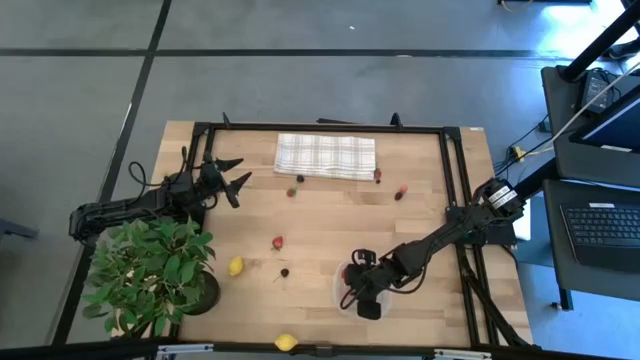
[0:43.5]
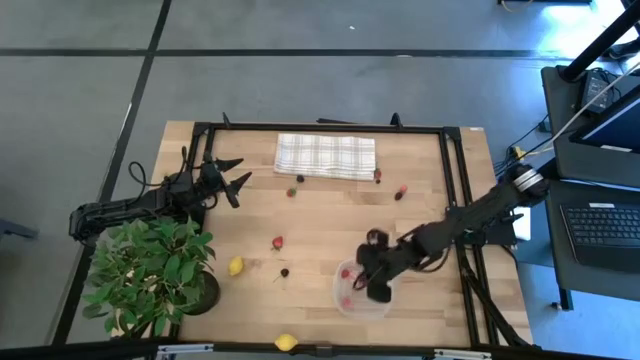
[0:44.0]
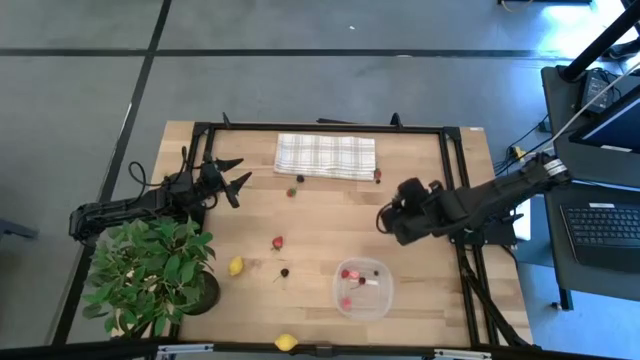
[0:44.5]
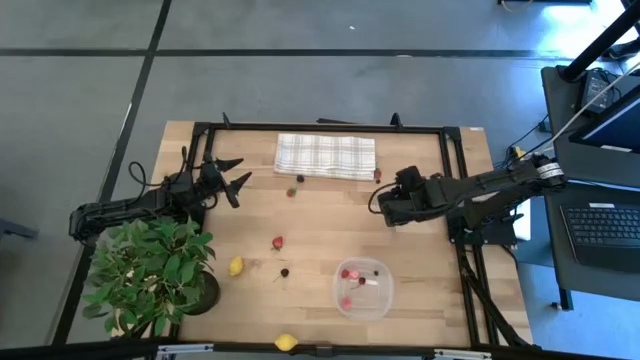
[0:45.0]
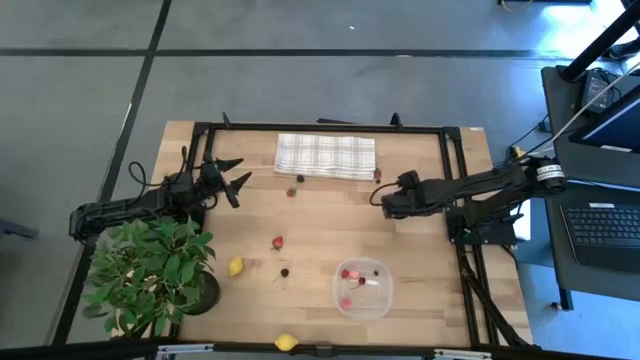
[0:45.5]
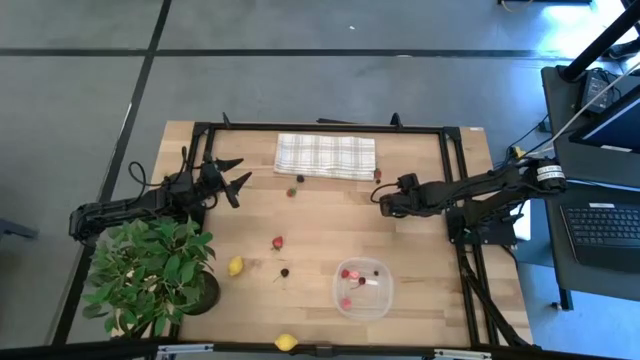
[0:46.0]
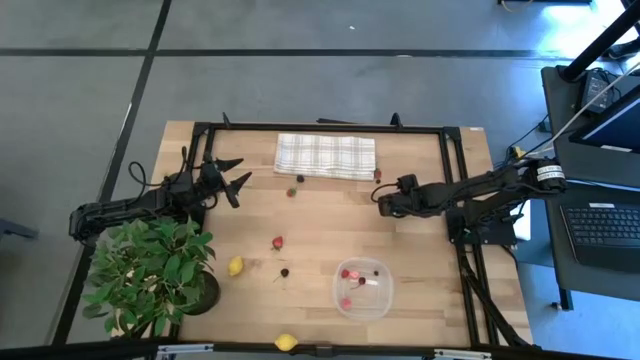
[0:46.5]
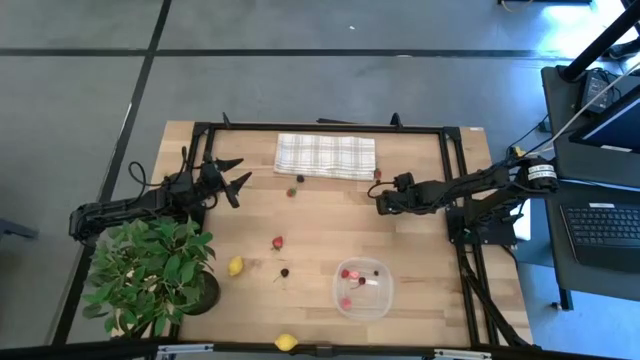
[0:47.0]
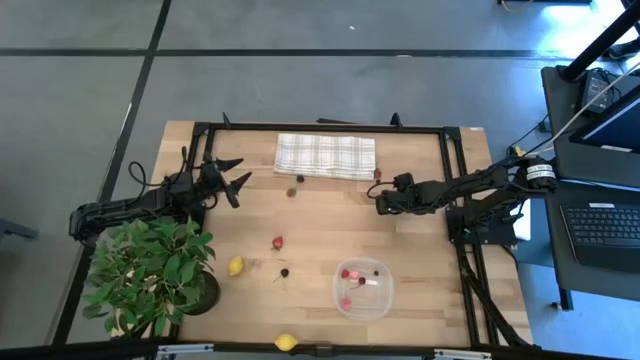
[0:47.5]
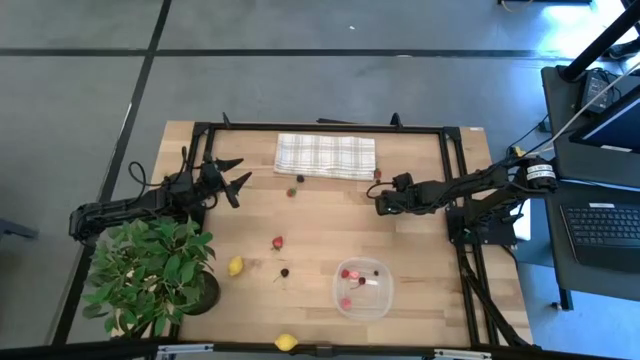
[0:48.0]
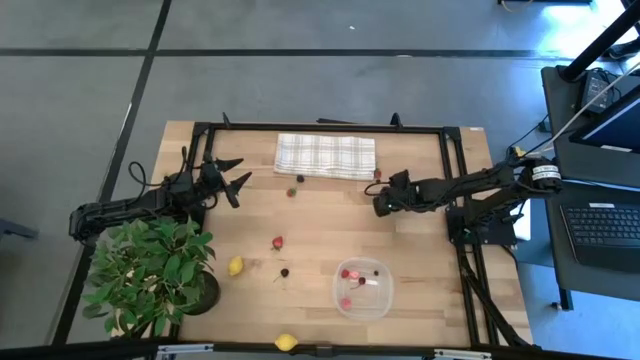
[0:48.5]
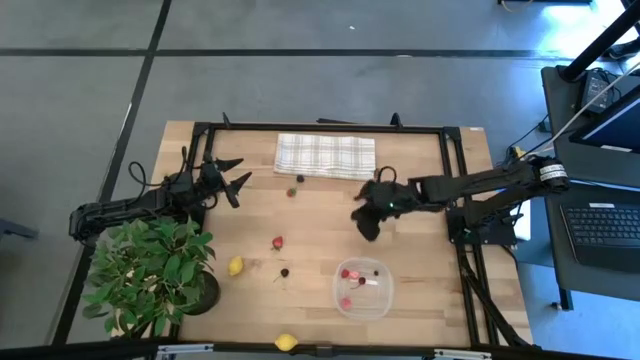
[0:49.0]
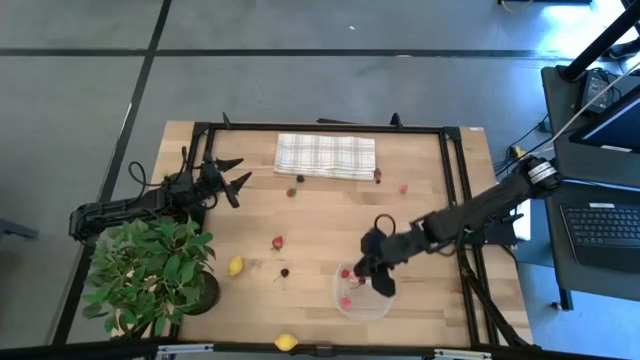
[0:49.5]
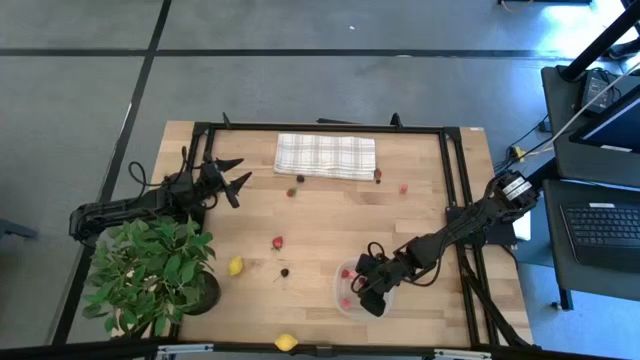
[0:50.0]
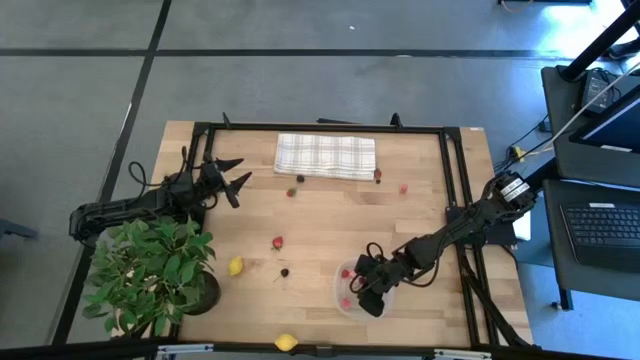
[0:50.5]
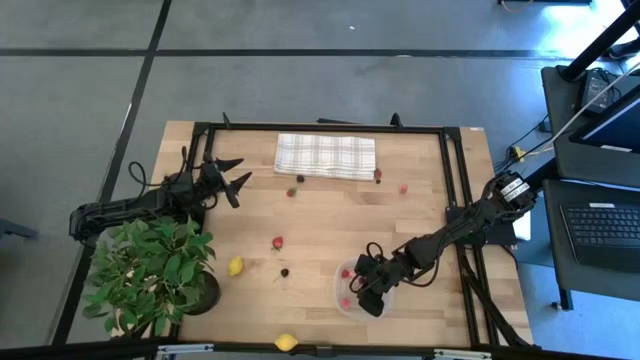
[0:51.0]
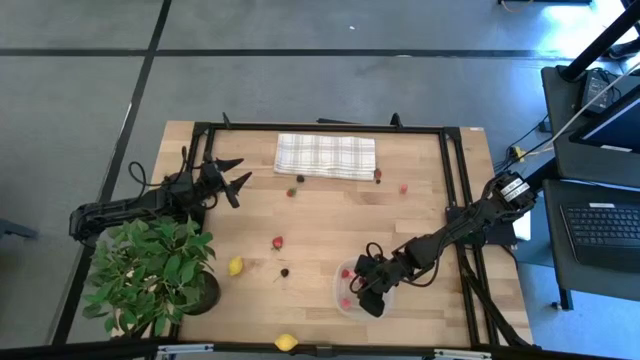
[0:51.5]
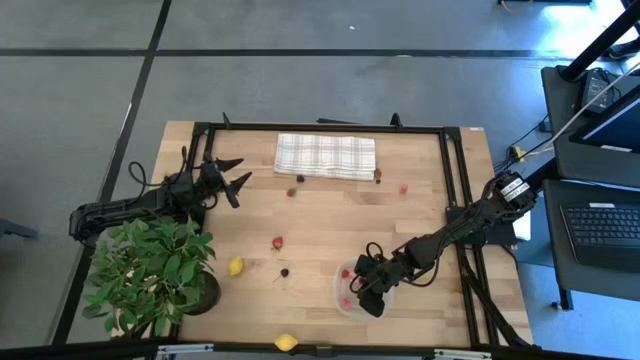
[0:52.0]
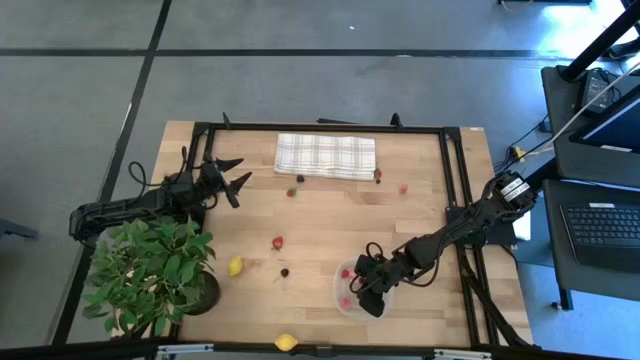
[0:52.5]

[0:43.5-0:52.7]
Task: Pick and placing Produce into tupperware
Put the right dark purple blackberry into the transparent bin

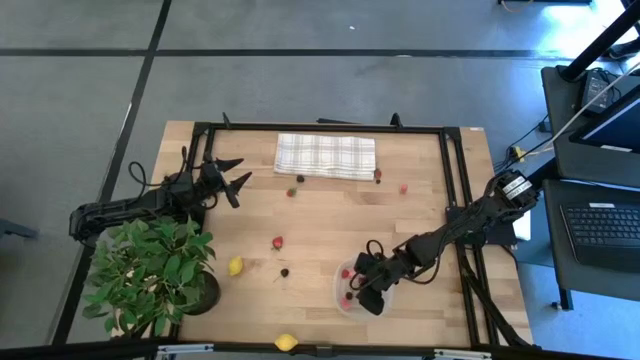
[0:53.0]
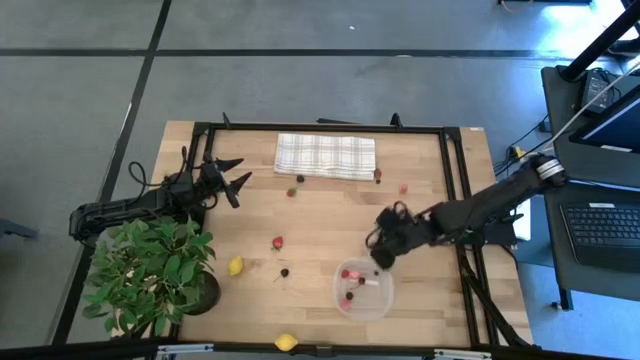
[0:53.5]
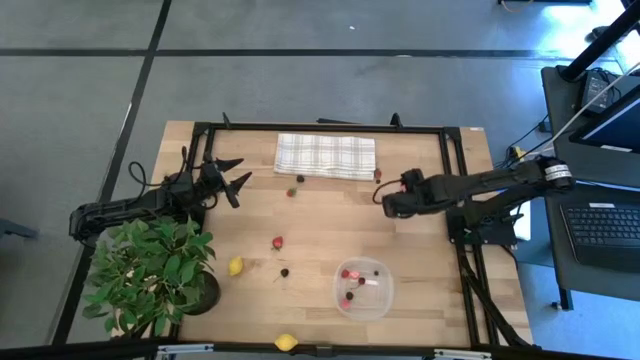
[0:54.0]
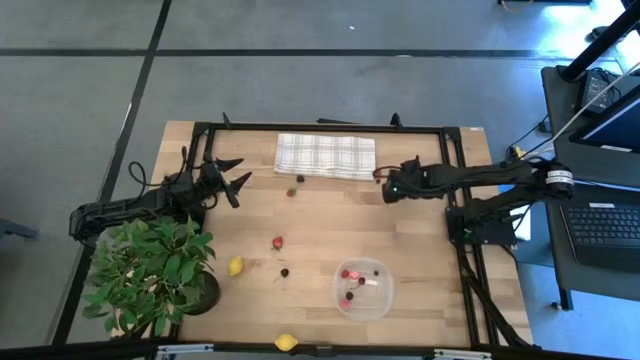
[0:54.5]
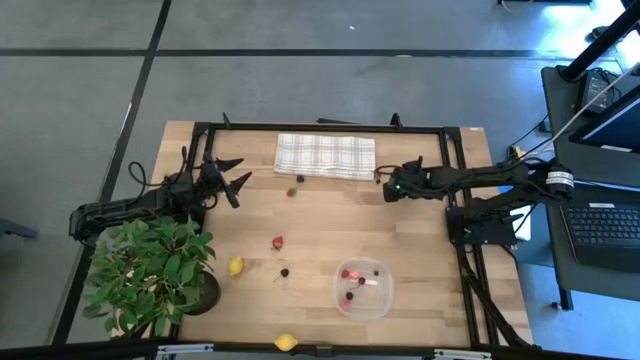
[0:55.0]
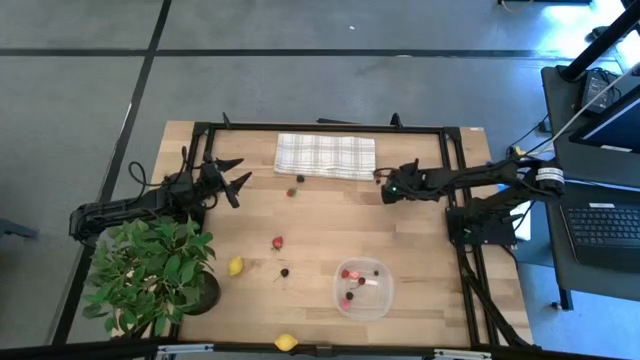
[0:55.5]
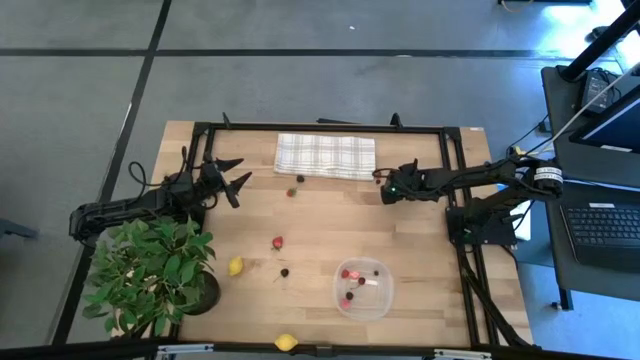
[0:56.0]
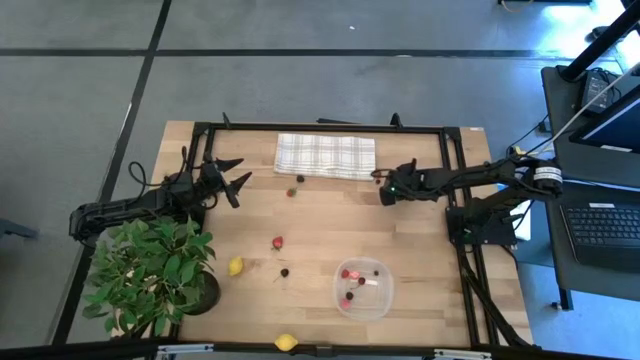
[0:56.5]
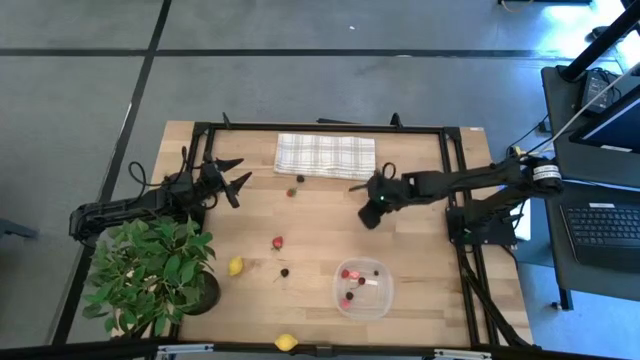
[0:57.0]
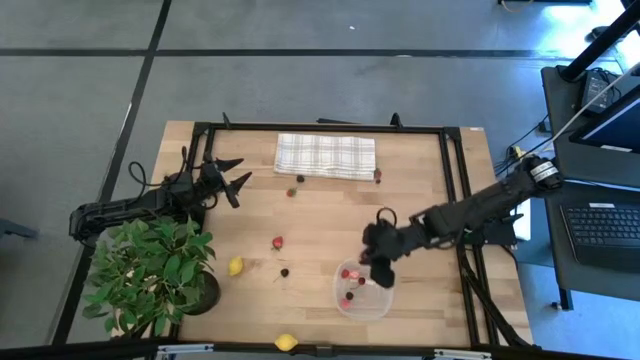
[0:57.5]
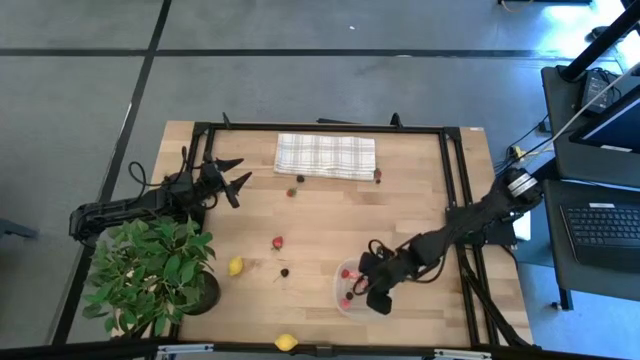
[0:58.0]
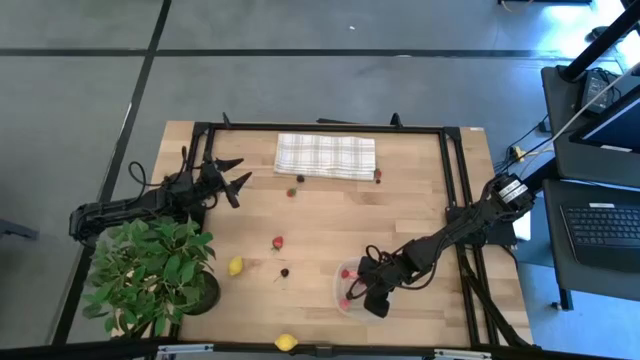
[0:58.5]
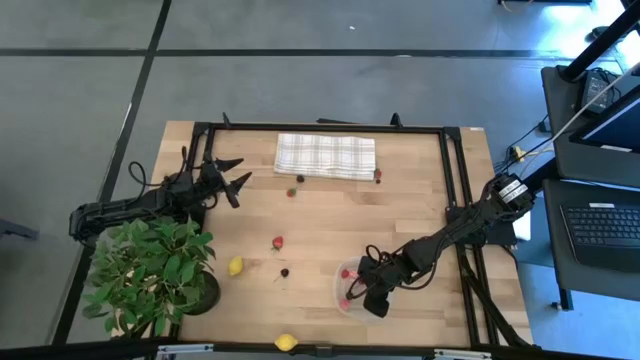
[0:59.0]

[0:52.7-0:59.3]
Put the pink peach into the transparent bin

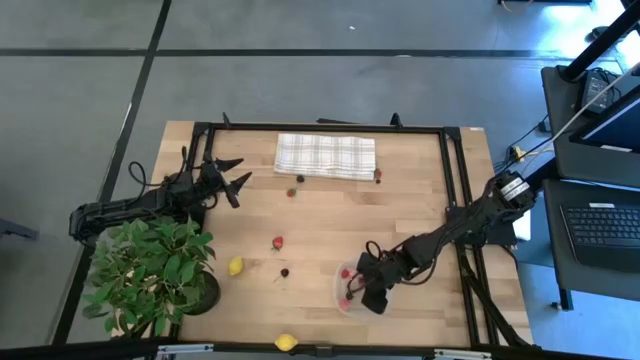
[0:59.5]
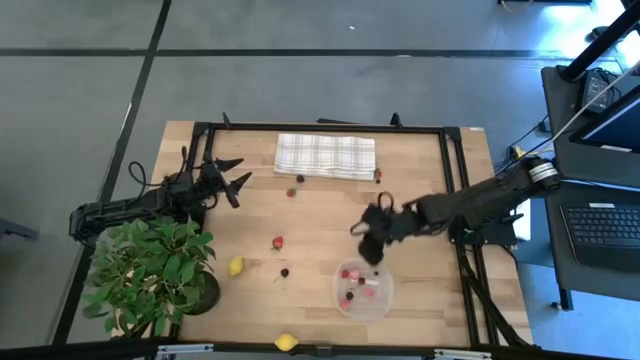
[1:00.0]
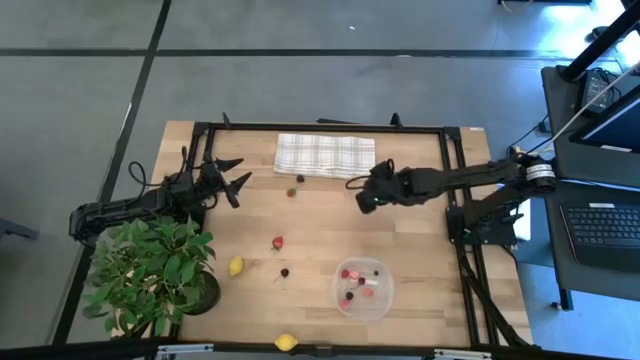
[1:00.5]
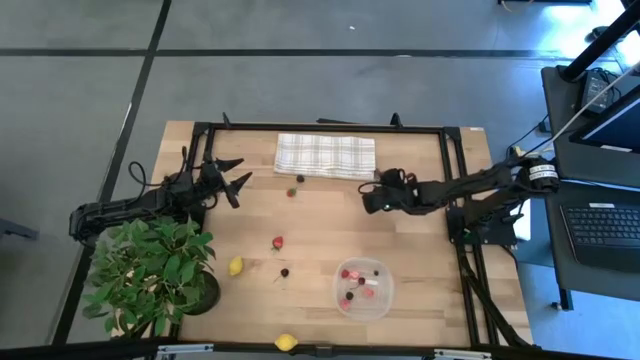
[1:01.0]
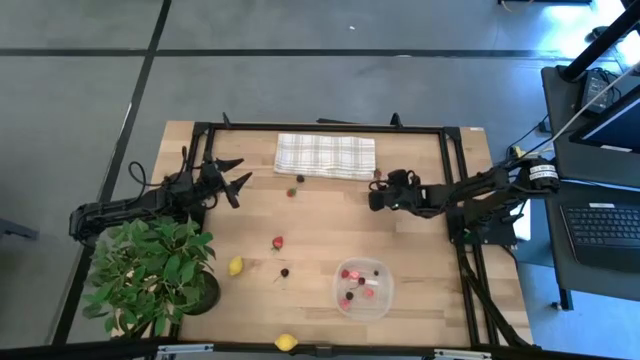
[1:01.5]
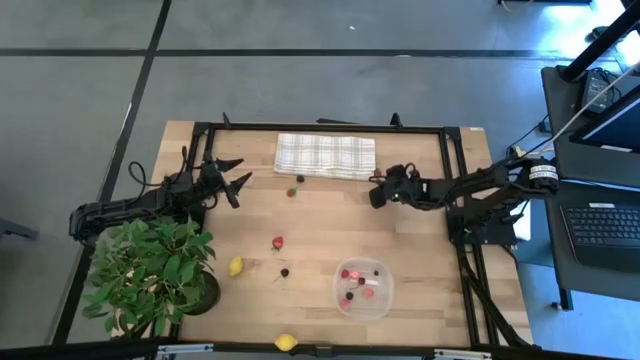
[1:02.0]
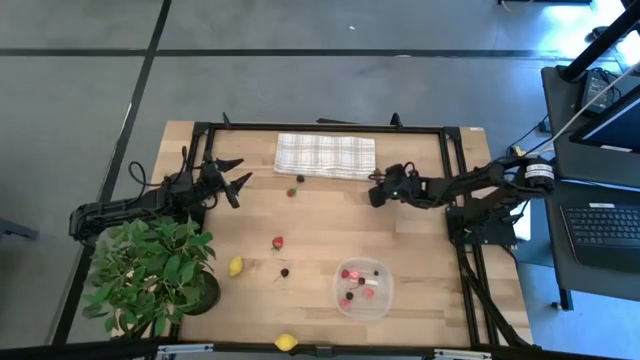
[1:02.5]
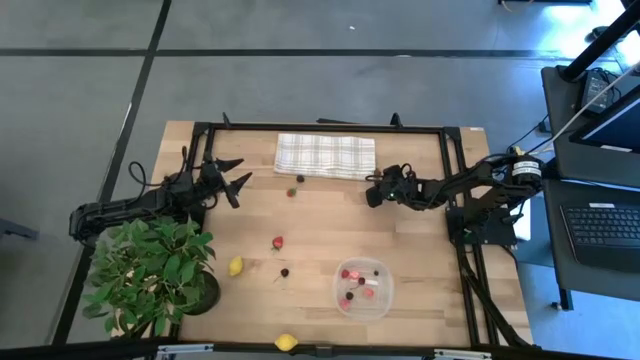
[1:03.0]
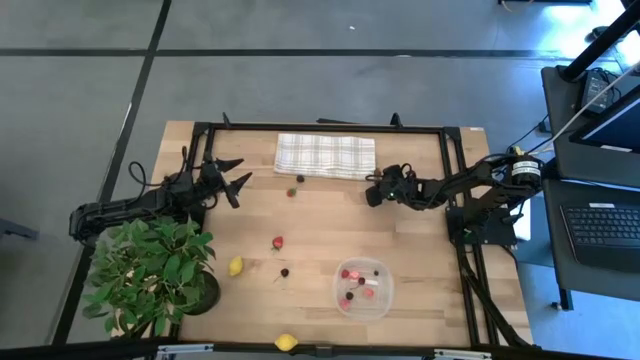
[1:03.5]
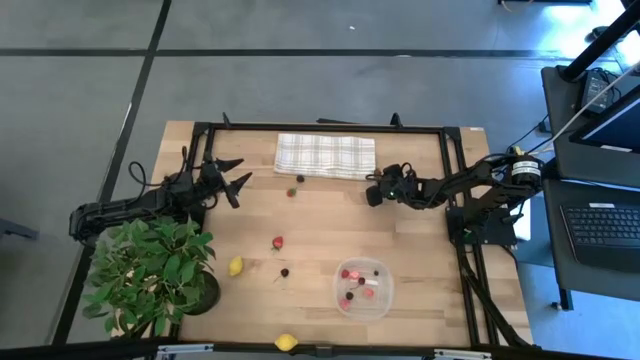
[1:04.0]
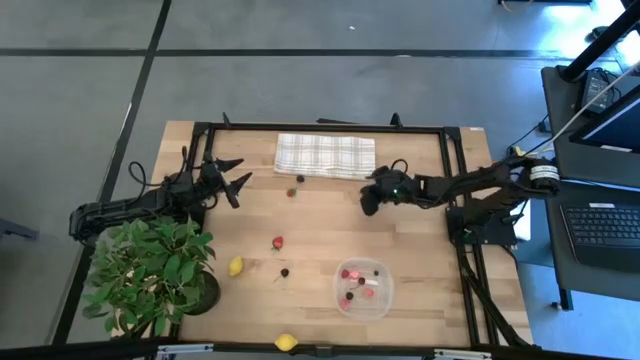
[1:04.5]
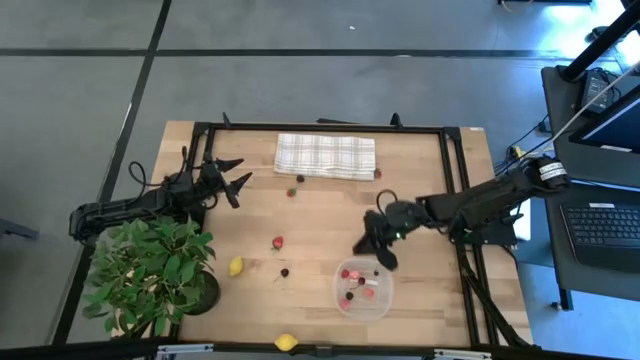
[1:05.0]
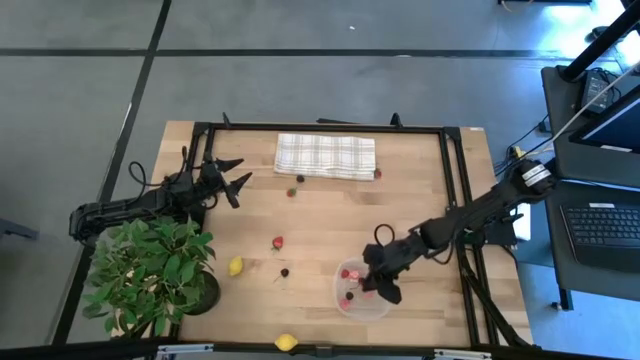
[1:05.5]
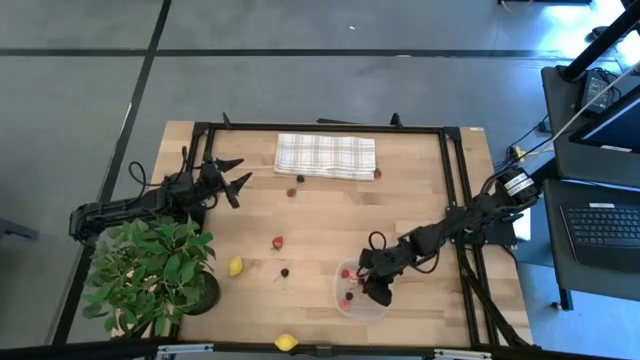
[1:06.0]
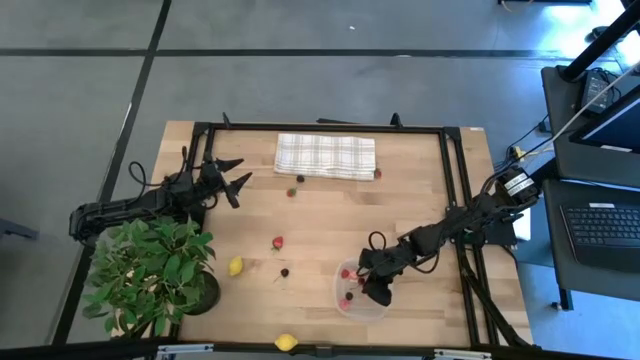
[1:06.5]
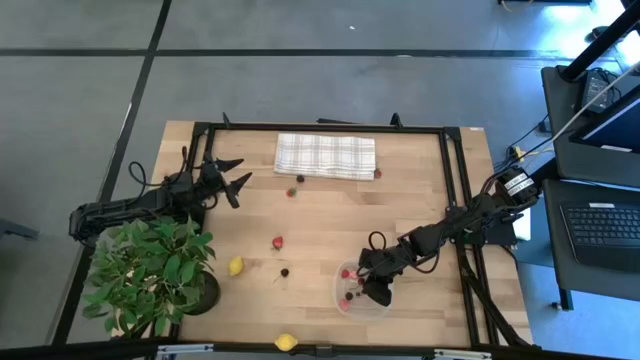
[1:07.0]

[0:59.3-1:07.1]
Put the dark purple blueberry into the transparent bin
